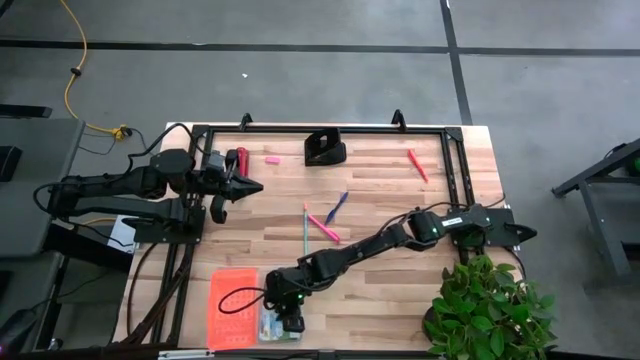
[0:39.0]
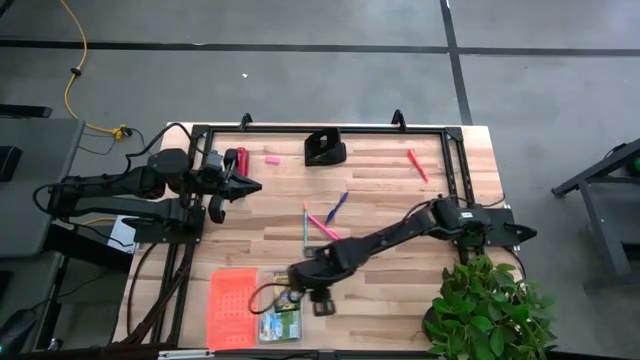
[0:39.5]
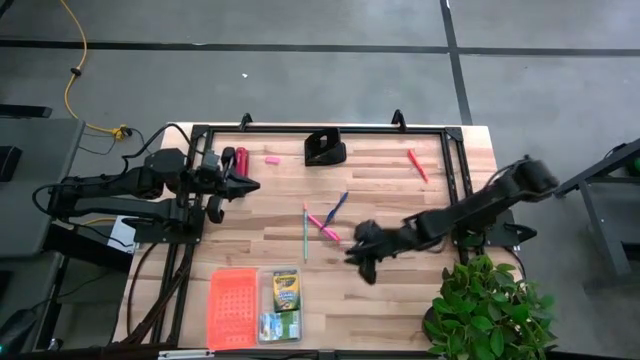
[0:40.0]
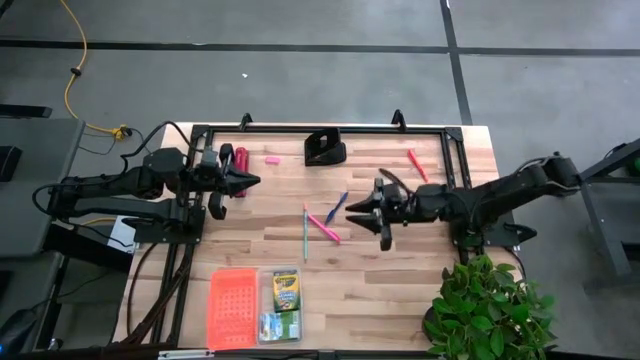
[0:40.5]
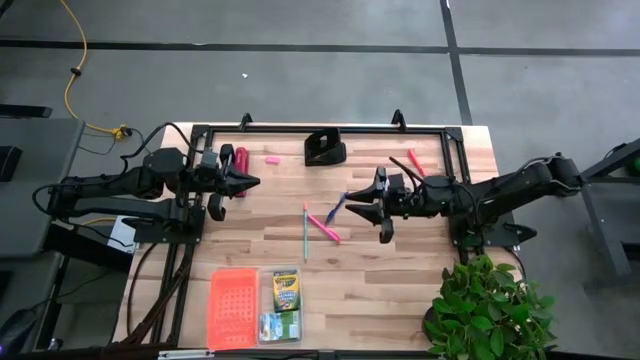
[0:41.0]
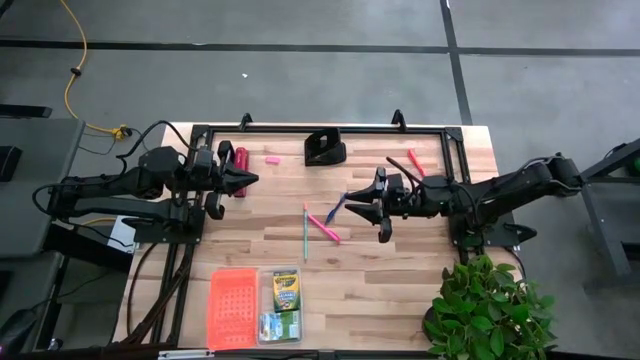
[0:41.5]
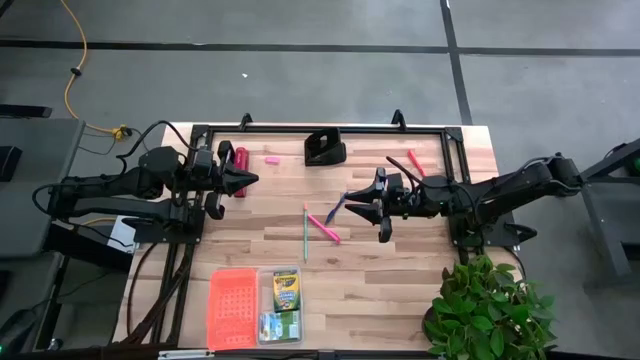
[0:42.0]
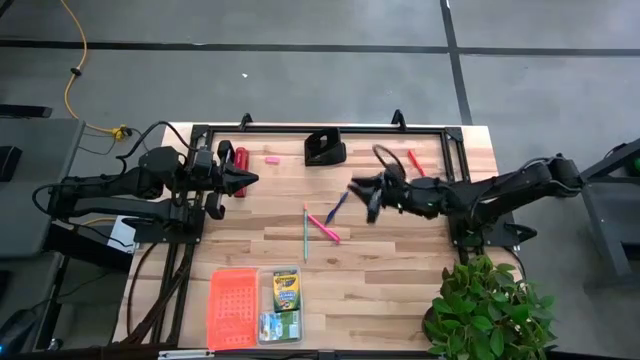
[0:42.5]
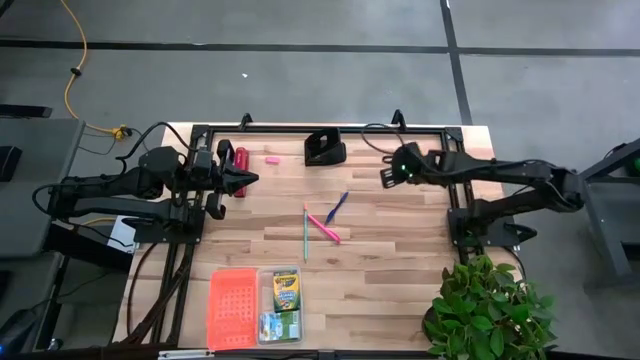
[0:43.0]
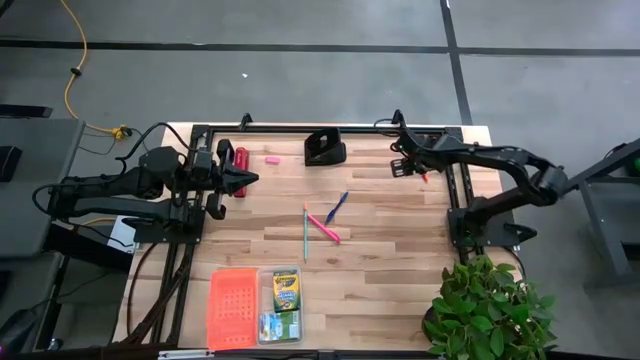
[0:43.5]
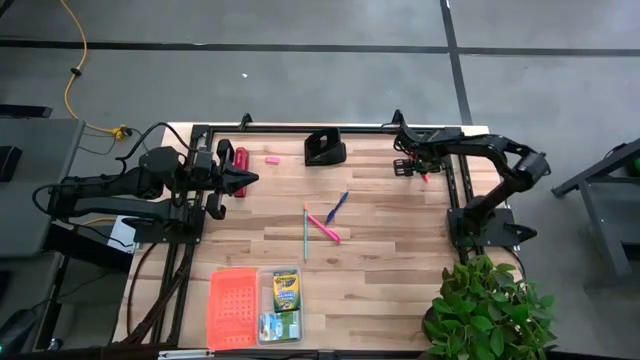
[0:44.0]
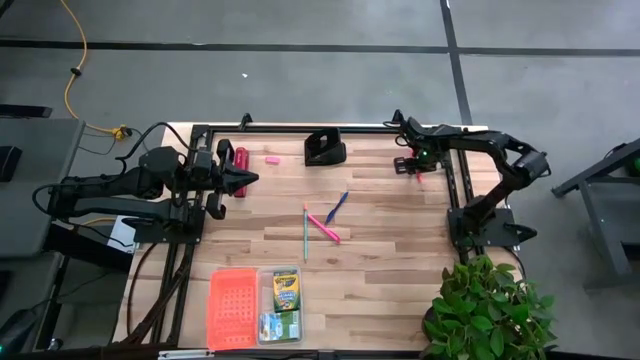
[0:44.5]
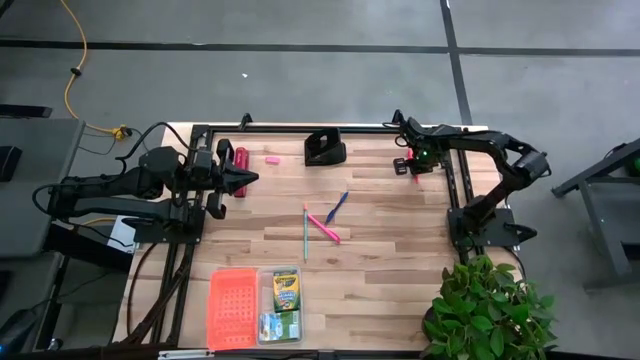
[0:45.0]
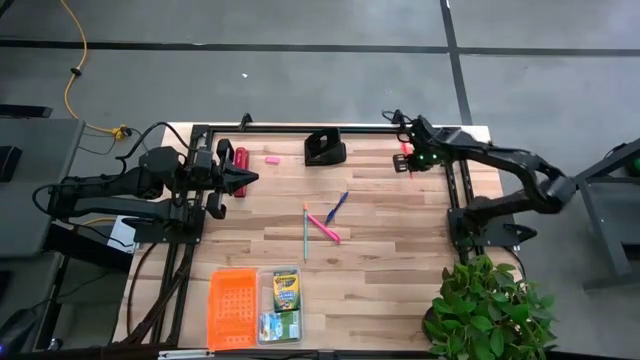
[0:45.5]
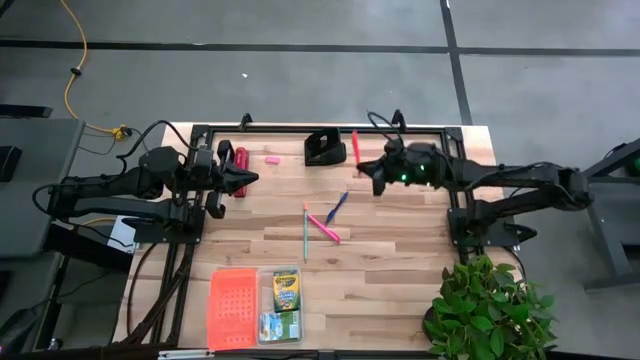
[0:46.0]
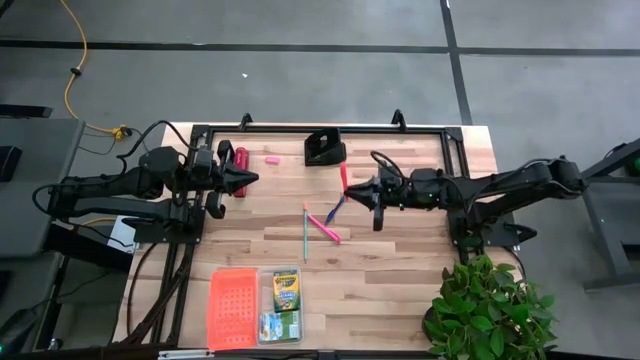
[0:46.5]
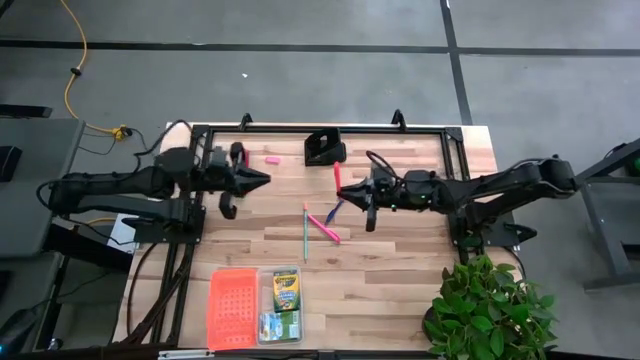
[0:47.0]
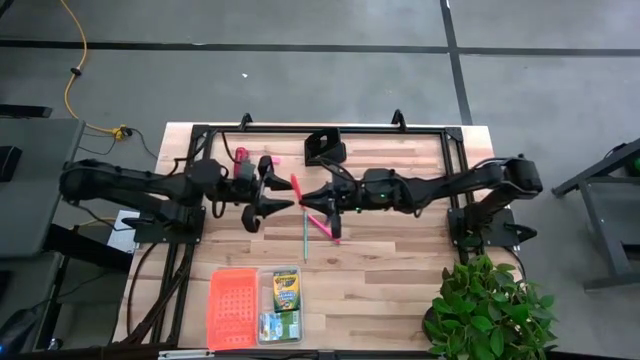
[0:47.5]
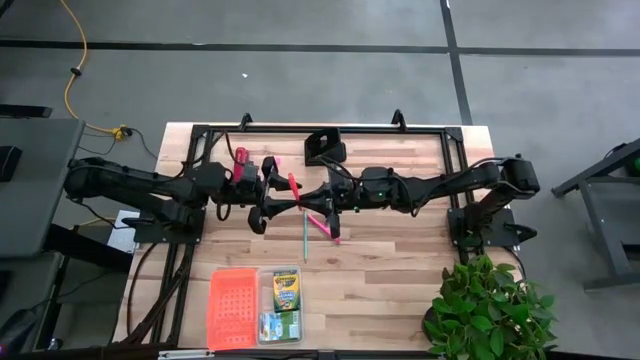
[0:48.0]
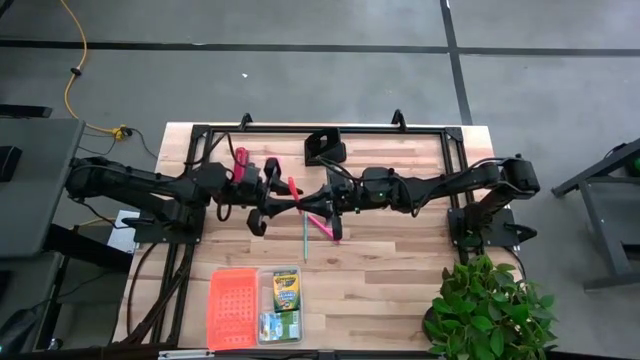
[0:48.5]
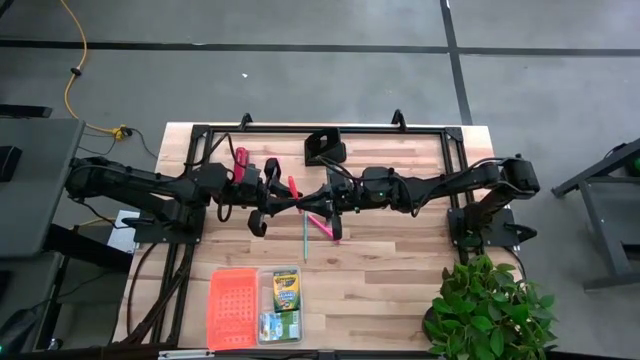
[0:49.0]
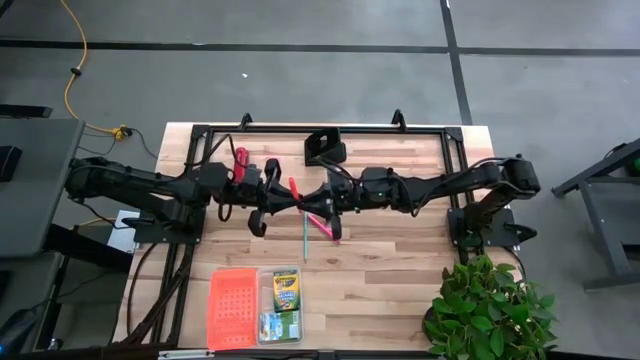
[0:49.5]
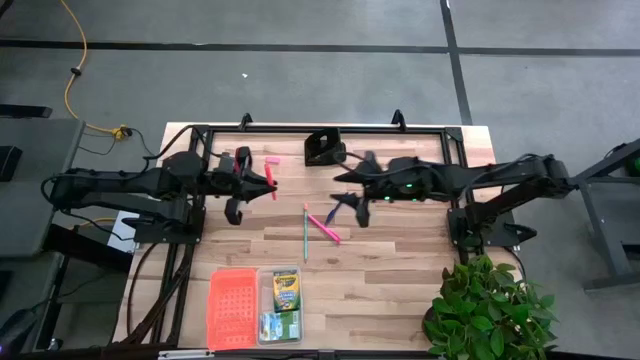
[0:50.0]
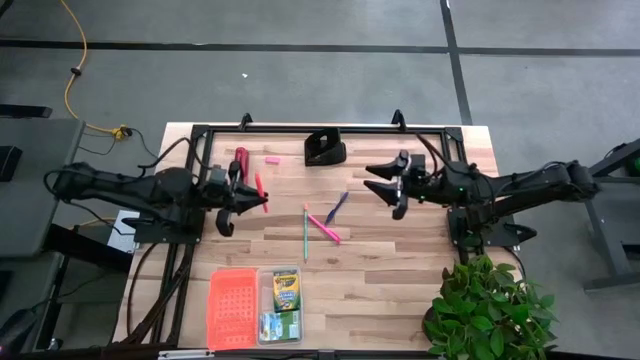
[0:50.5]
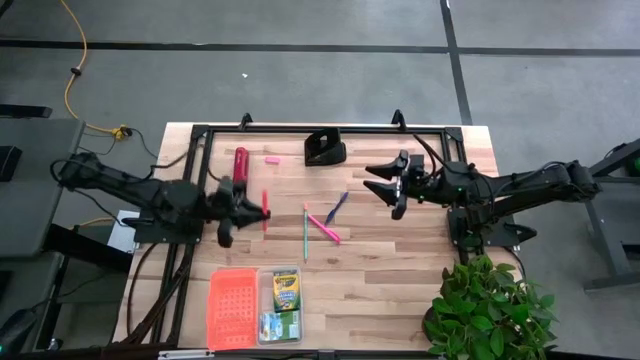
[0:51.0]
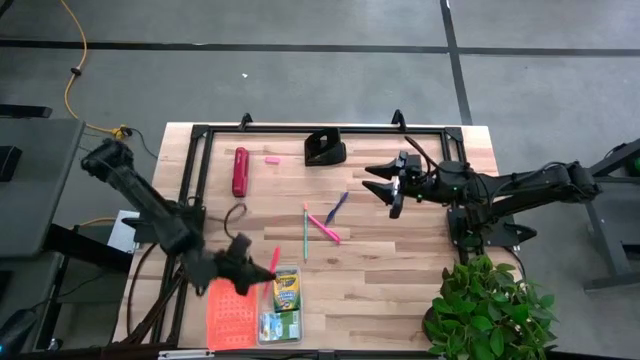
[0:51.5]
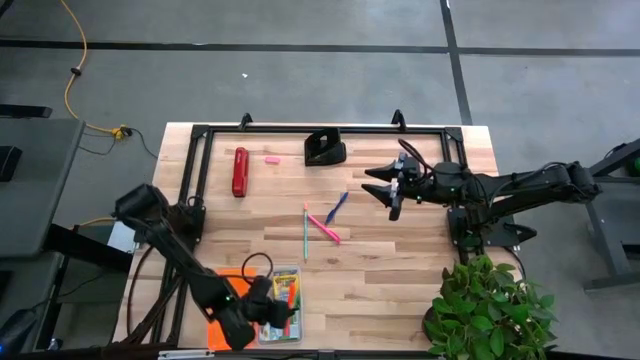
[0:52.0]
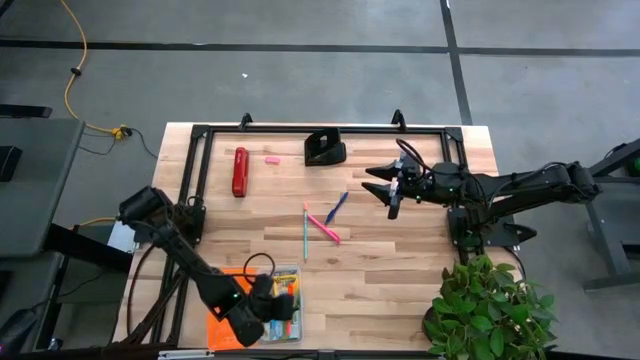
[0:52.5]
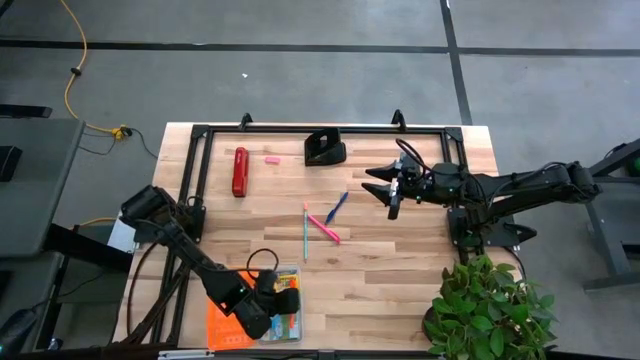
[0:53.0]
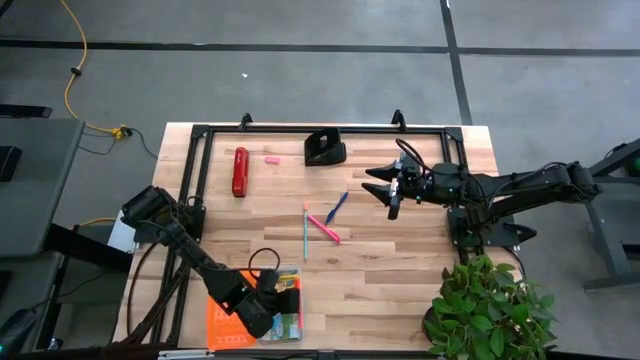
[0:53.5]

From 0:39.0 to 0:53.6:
Task: Pack school essentials
Put the orange pen into the supply box

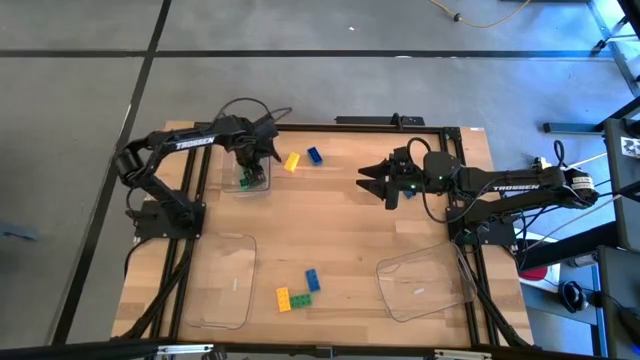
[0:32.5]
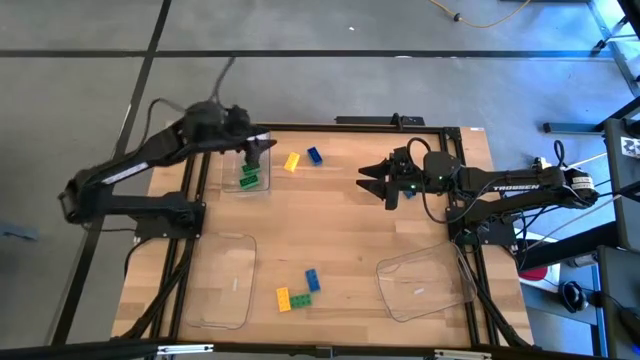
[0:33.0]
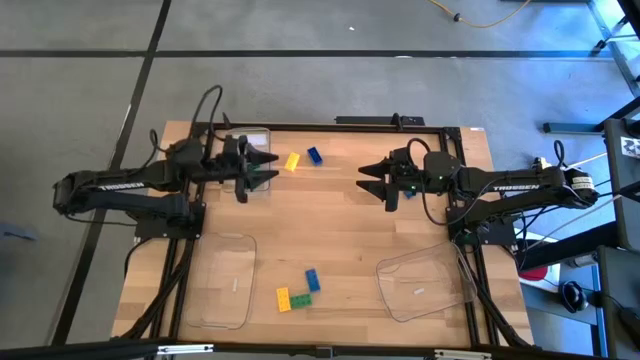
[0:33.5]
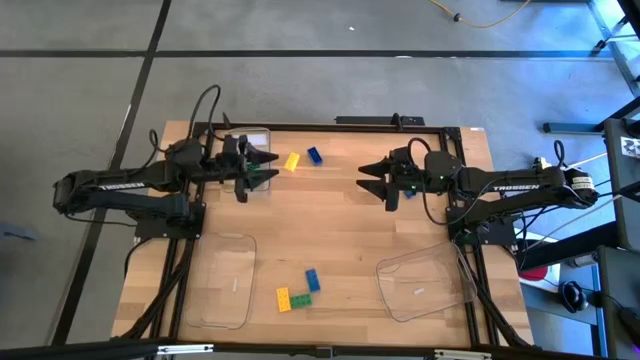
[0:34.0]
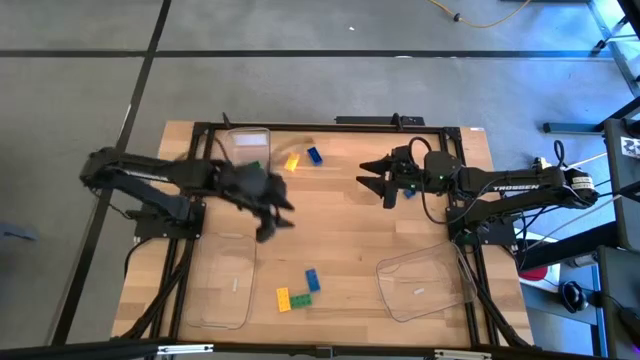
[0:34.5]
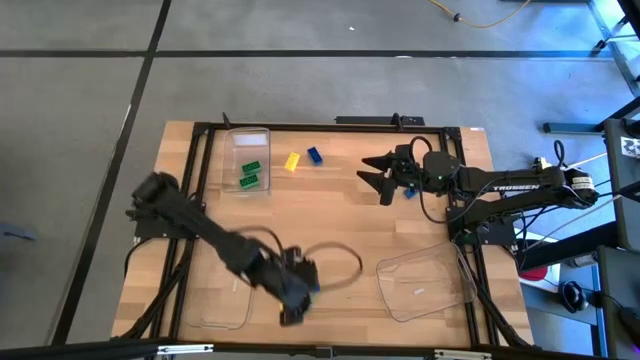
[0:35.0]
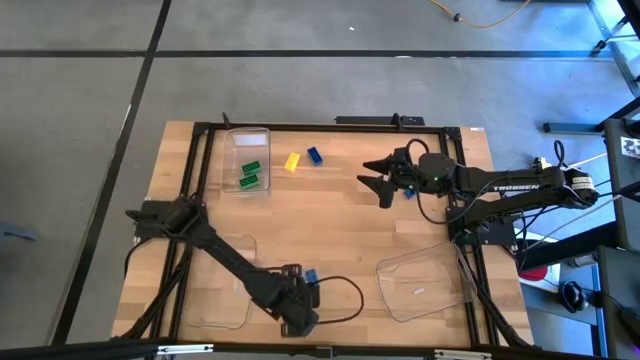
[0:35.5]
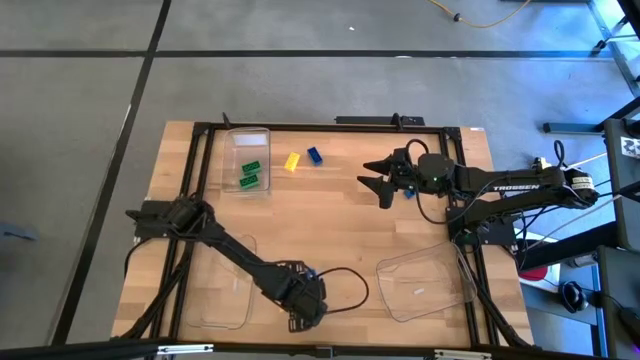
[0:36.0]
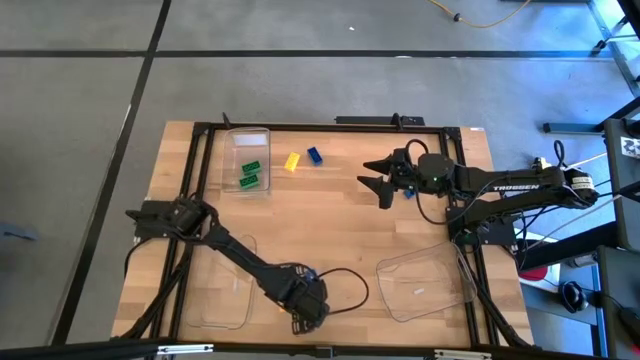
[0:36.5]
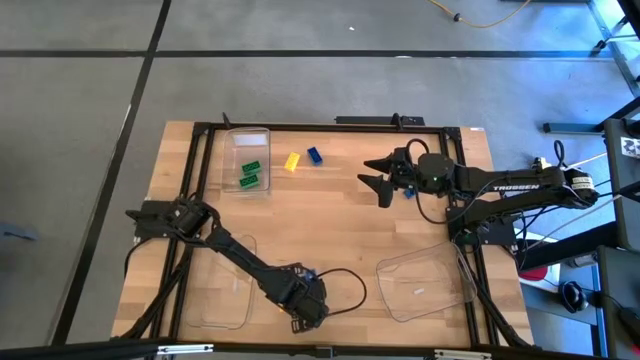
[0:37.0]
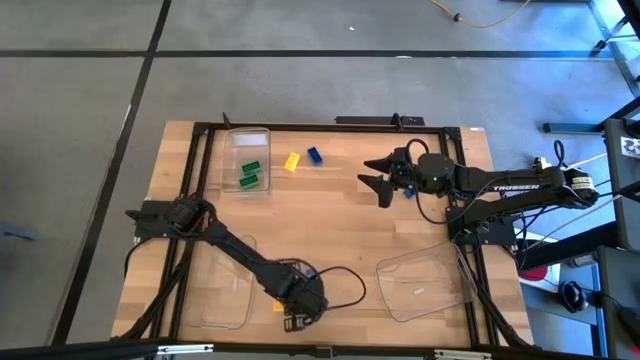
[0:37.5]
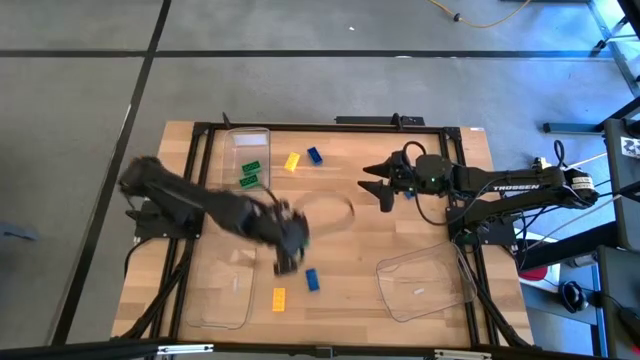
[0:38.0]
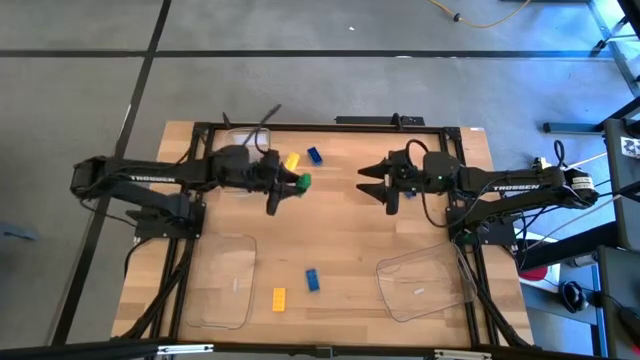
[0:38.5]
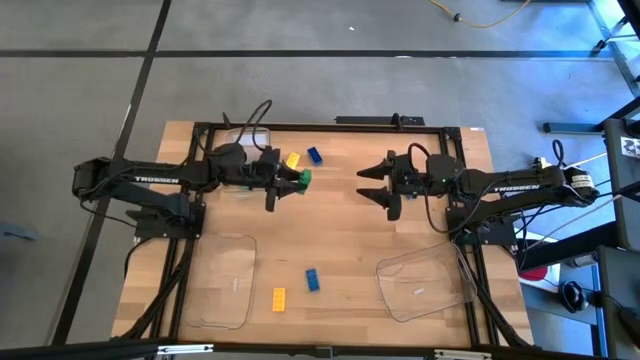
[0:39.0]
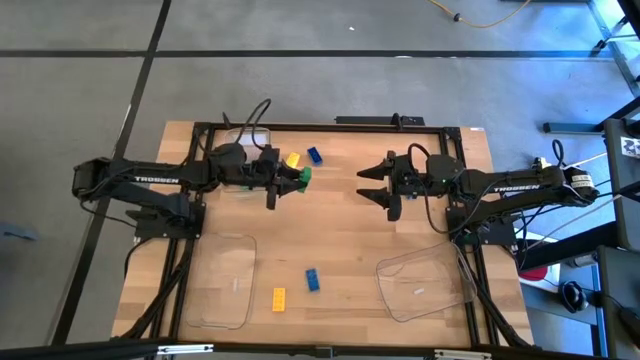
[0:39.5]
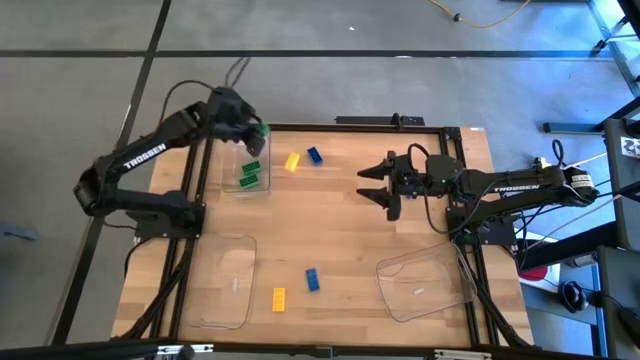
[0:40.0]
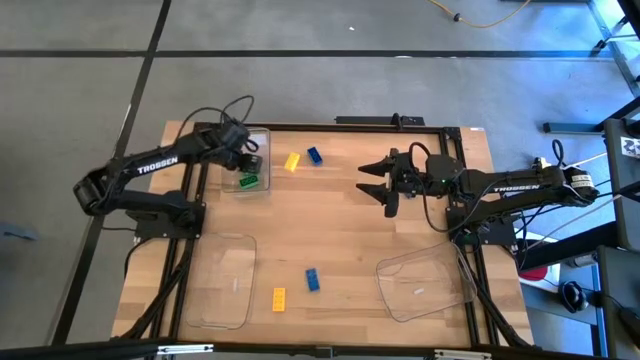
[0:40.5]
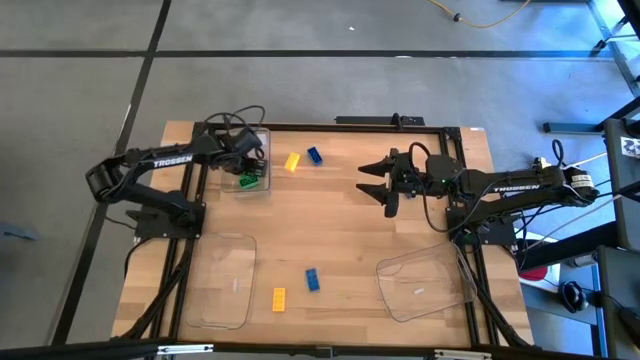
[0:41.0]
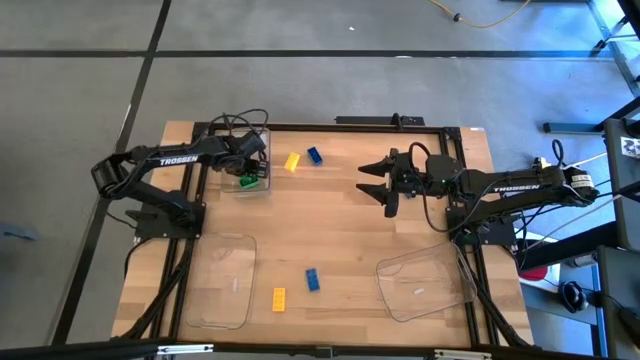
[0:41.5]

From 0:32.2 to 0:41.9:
Task: Sort & place blocks by color
Put the green game piece into the top left transparent bin
